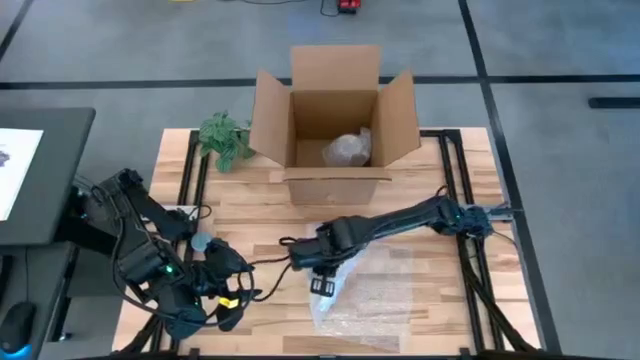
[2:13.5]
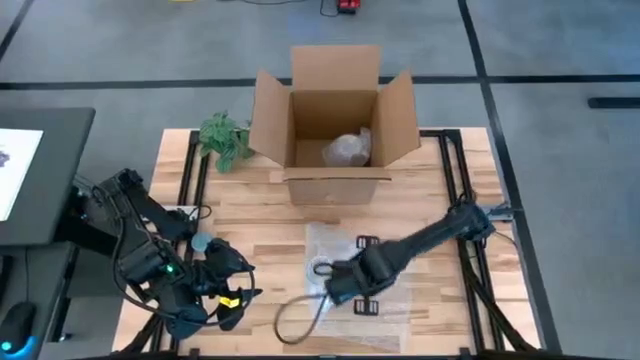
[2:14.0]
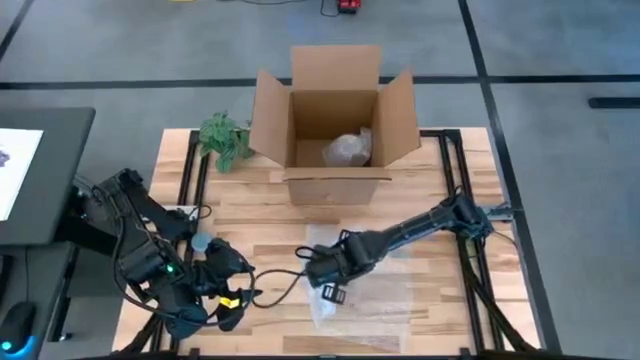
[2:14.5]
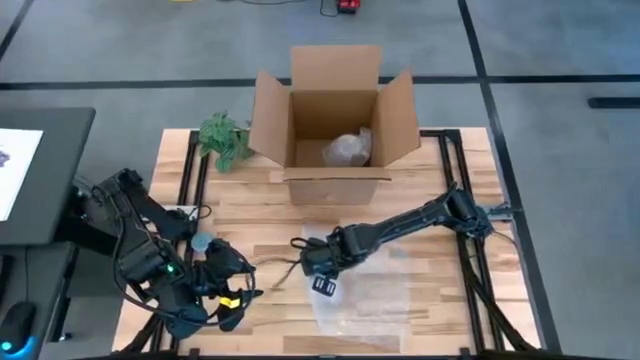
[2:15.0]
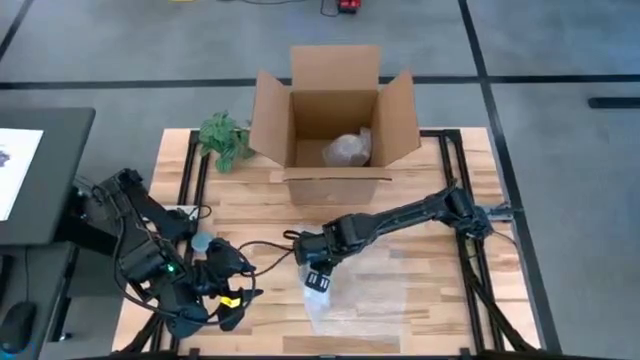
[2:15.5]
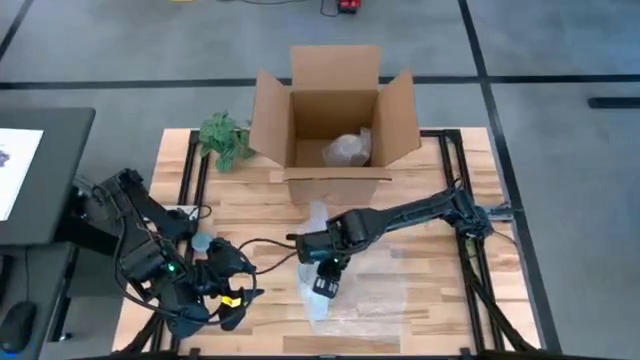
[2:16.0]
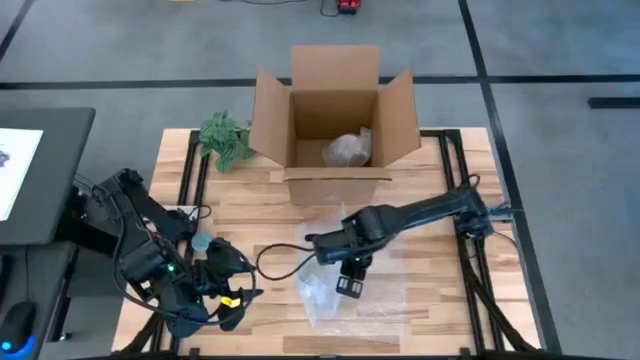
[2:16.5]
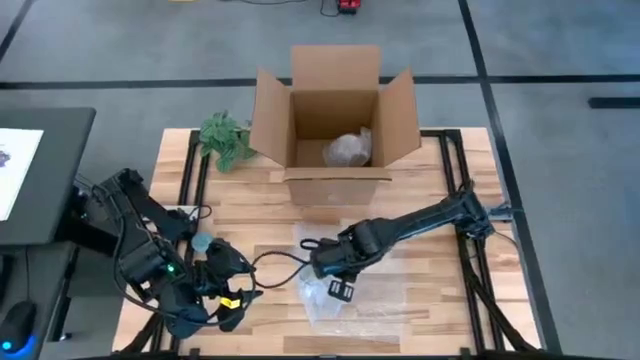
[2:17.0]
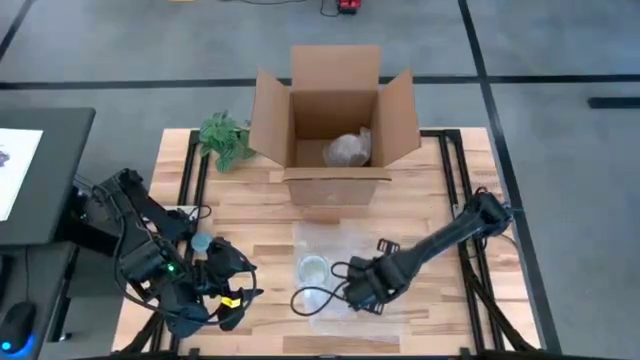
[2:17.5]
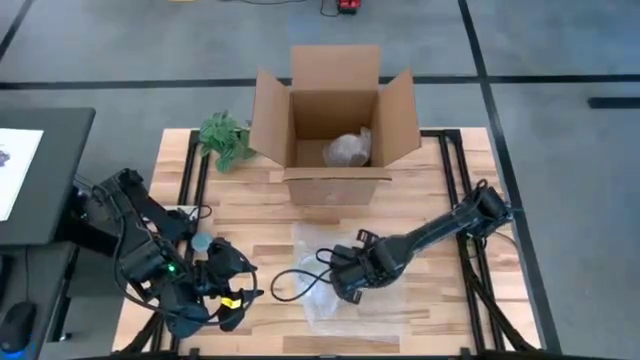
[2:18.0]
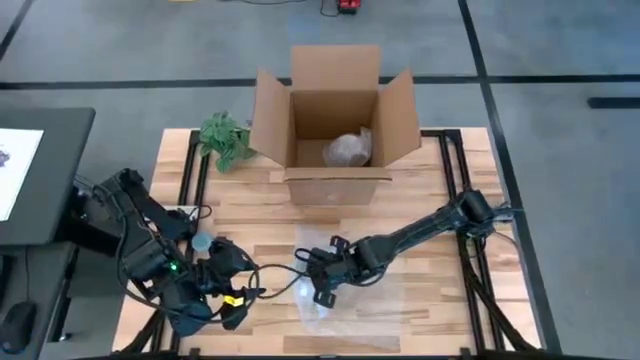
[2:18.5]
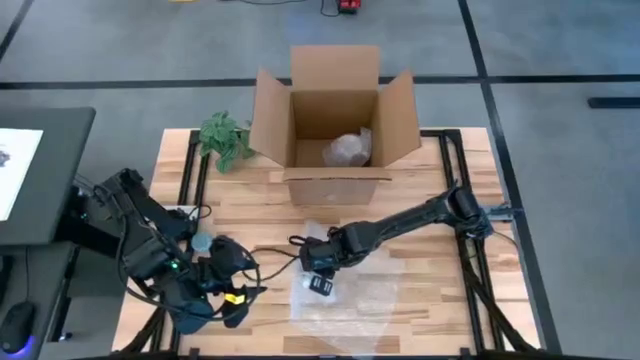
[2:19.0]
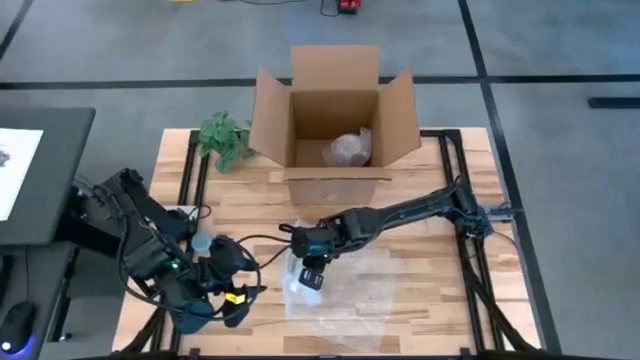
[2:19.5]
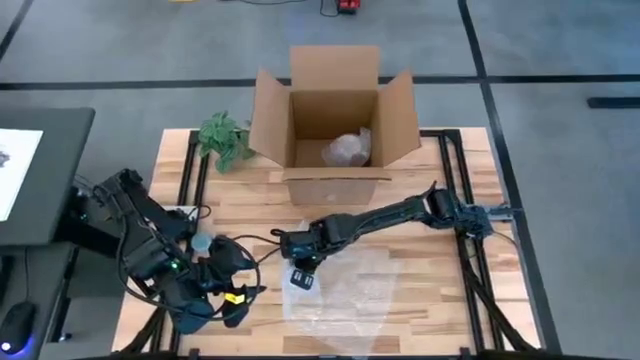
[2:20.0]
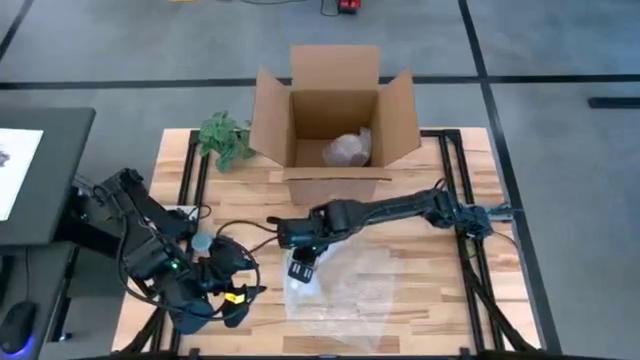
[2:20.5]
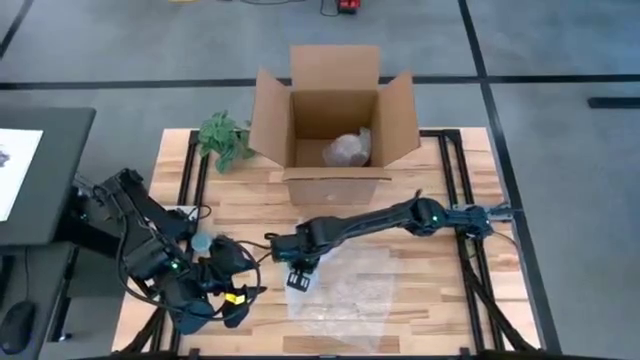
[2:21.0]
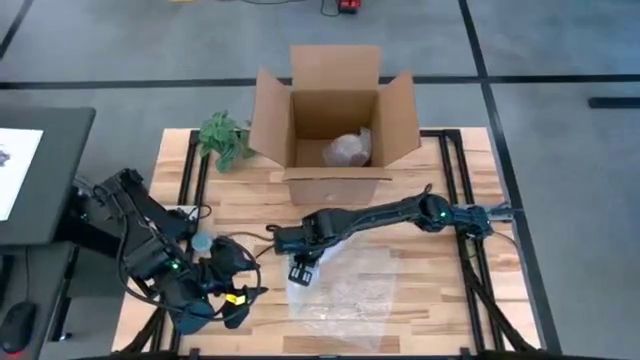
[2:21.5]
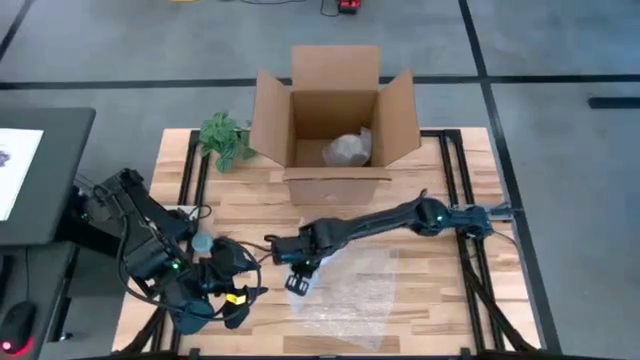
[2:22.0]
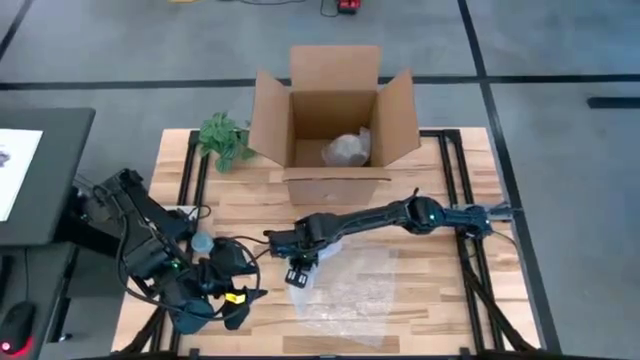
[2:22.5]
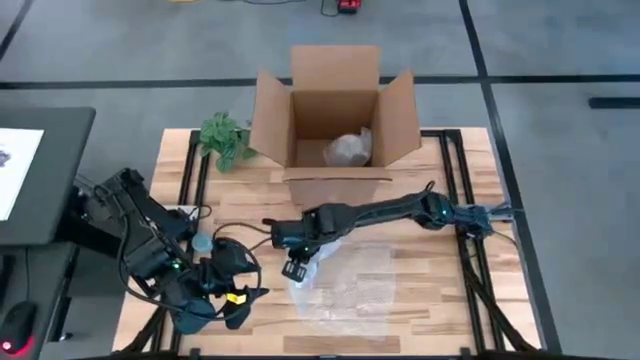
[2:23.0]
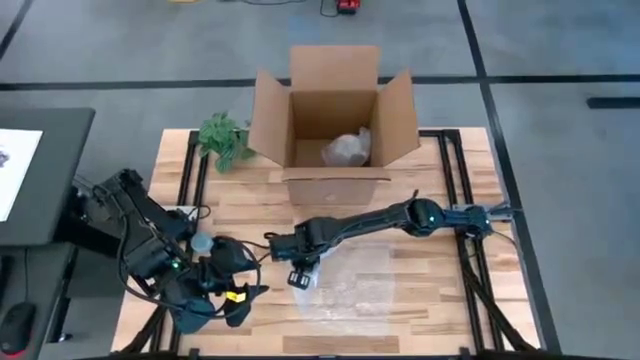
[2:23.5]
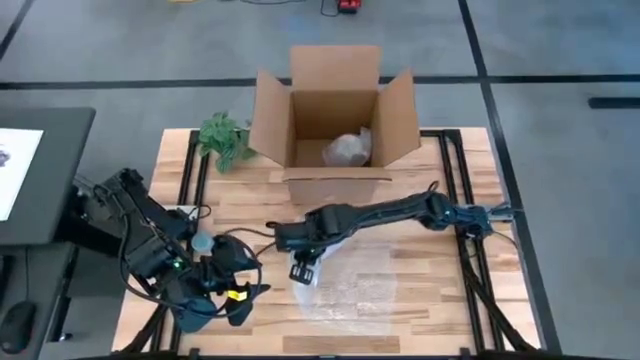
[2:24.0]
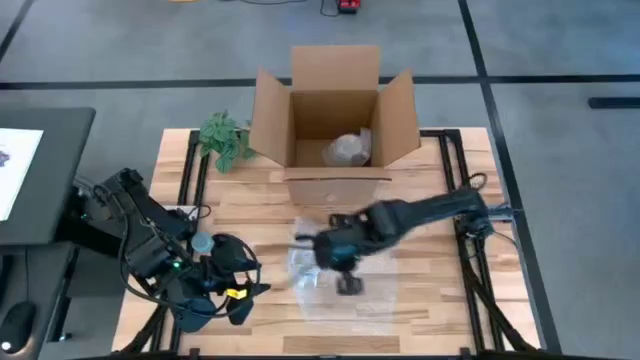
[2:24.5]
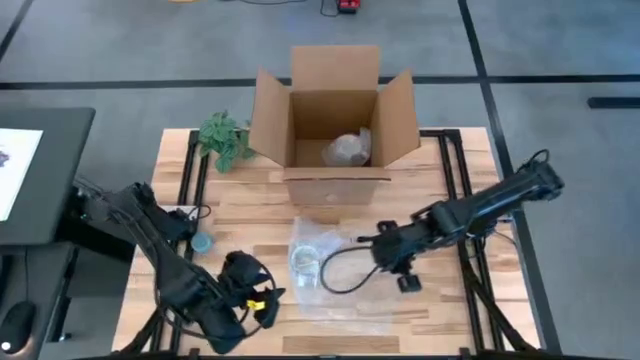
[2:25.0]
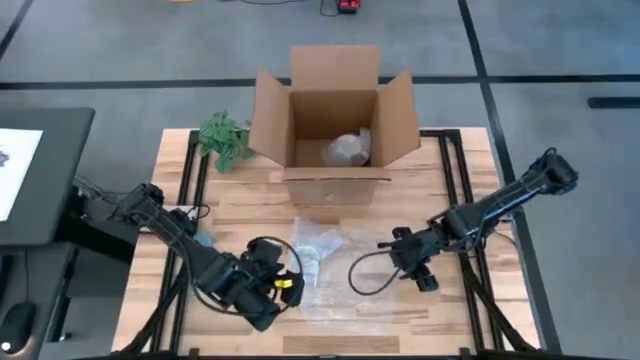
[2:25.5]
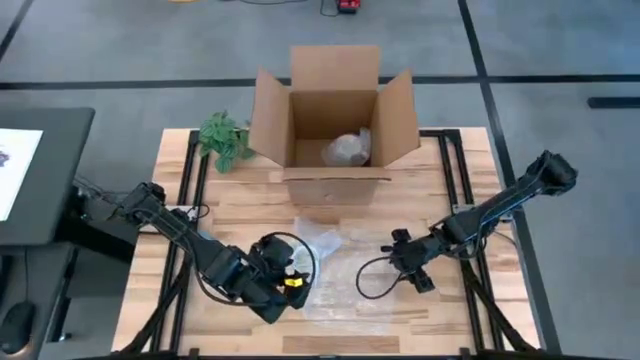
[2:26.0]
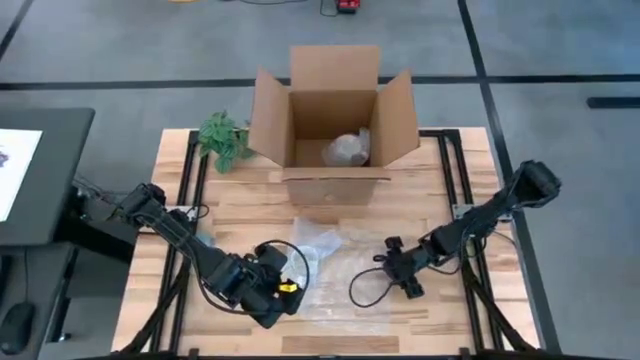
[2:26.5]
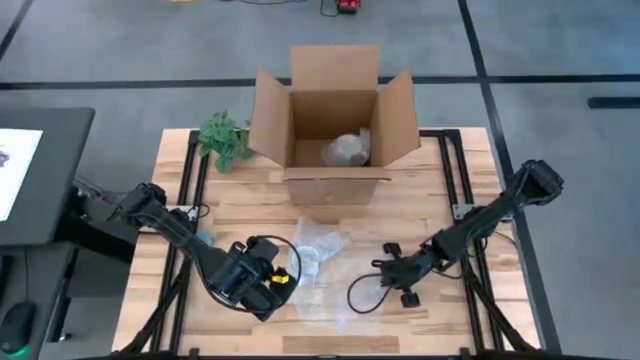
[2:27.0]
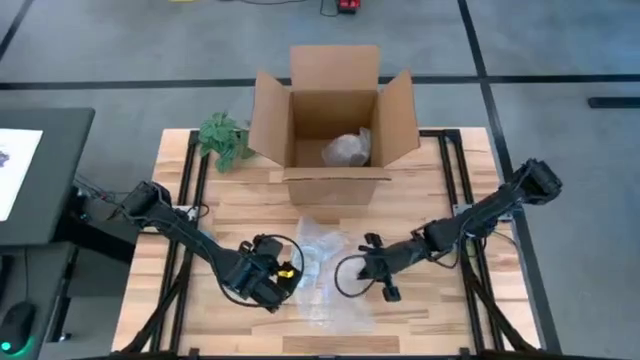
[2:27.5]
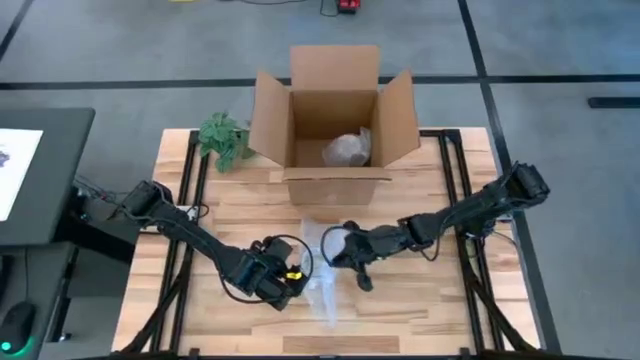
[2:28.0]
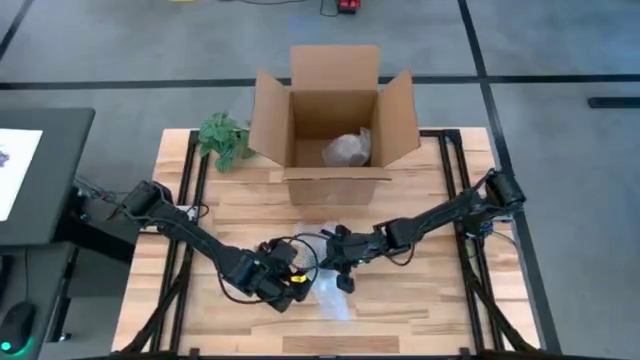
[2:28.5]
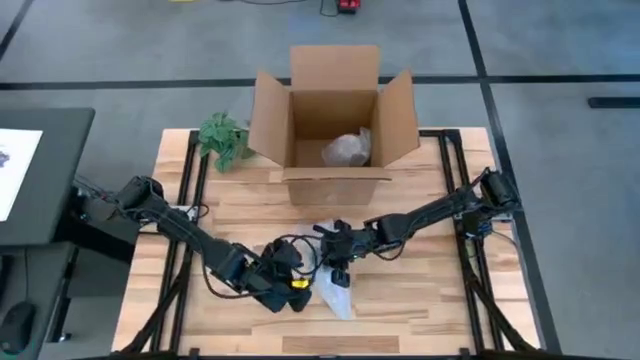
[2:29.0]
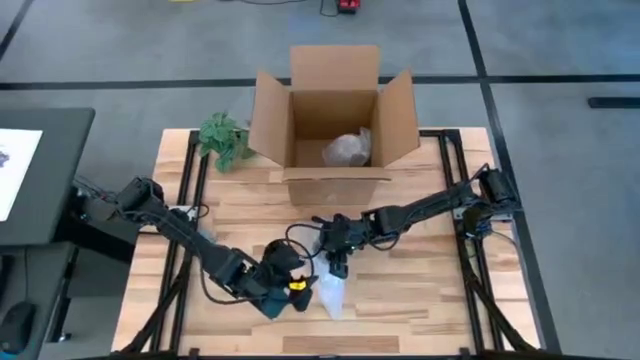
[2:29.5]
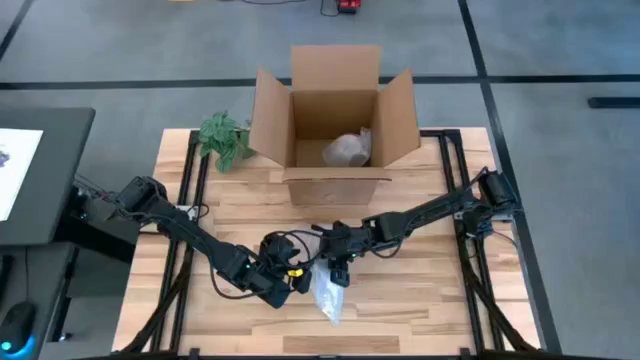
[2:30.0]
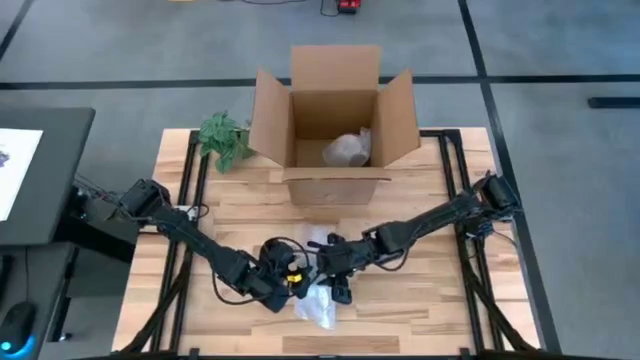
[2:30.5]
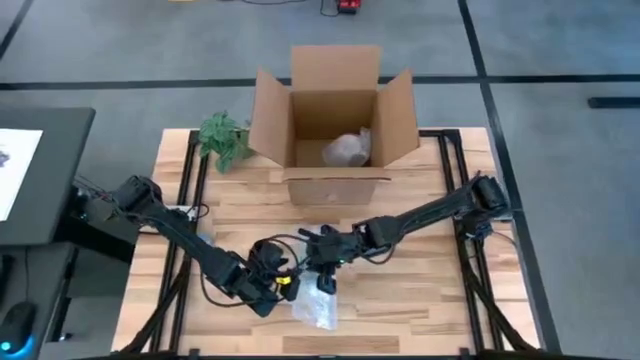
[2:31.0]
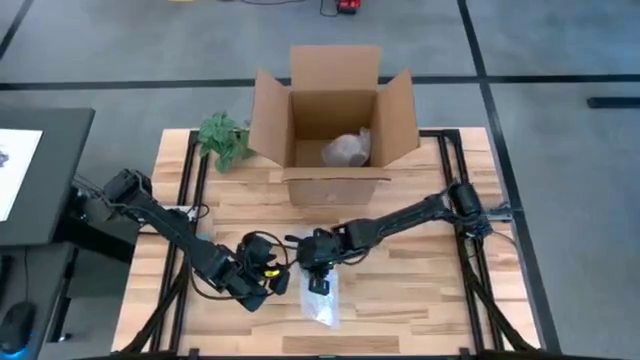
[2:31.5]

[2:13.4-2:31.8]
Task: wrap mug
Wrap the blue mug with bubble wrap

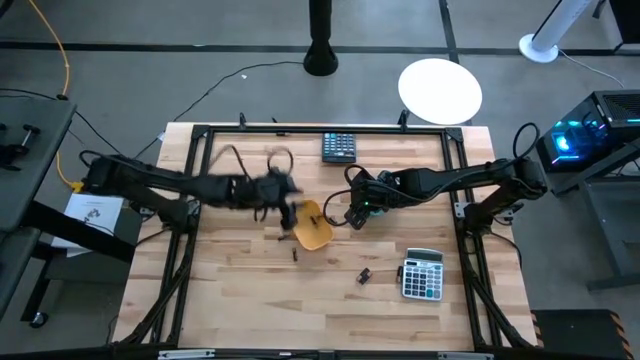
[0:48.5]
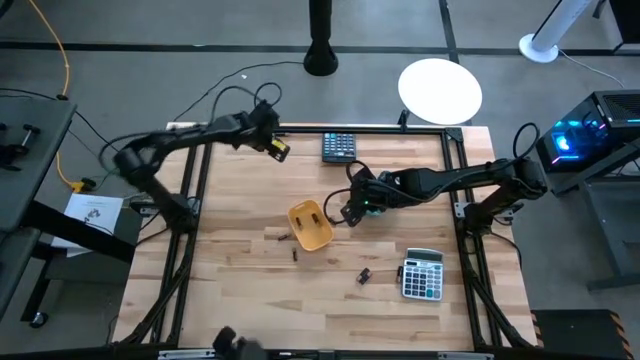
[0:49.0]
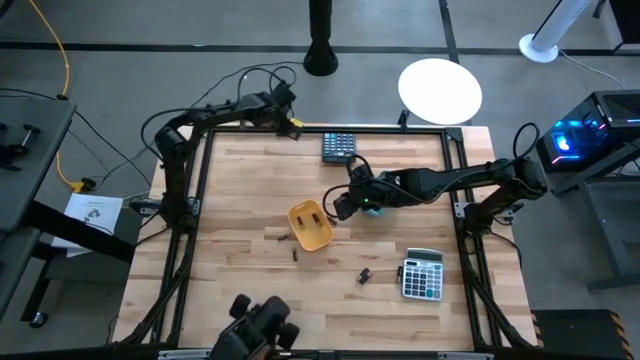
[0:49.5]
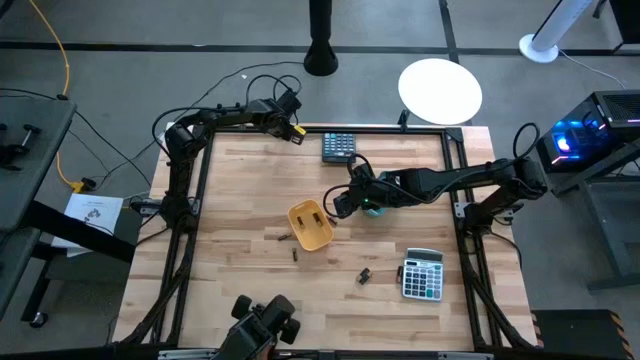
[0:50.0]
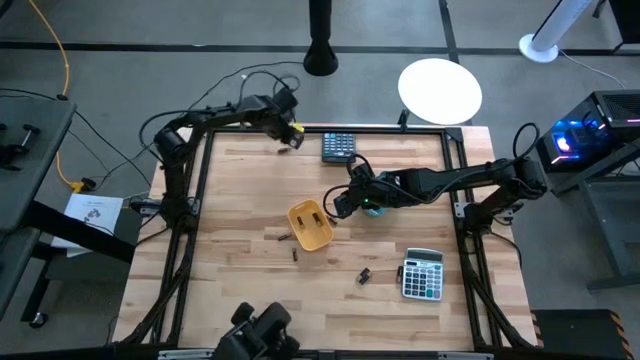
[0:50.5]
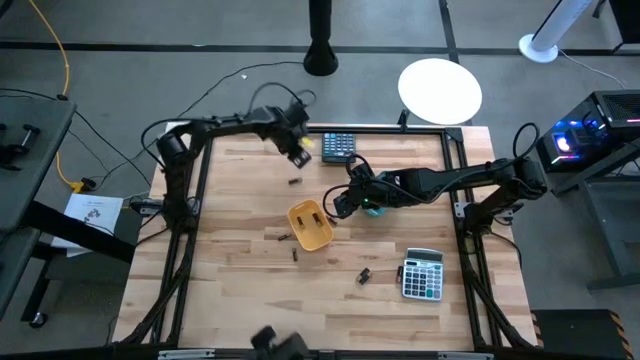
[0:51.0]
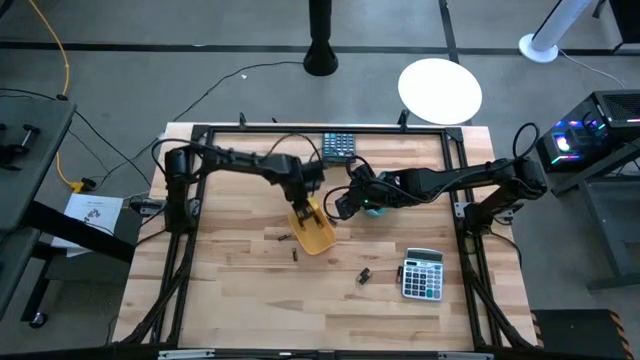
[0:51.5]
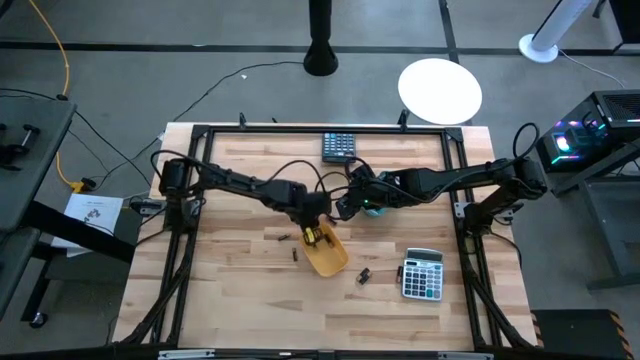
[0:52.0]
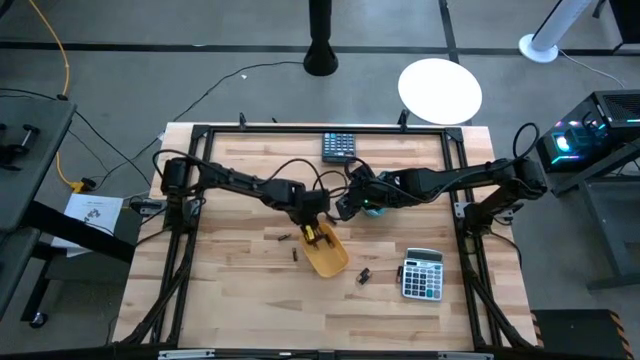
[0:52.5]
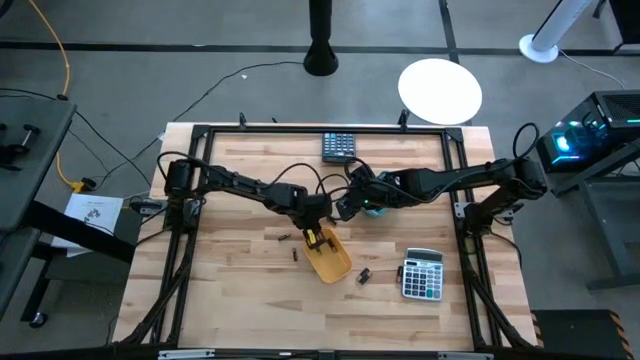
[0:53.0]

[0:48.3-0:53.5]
Task: Sort batteries
Put the black battery into the yellow bin
